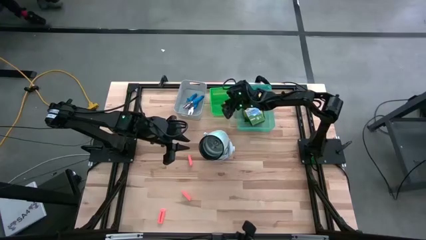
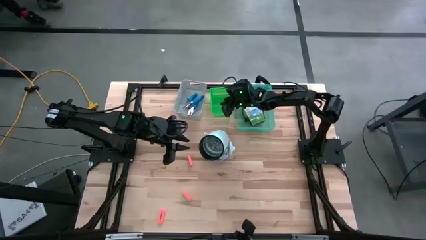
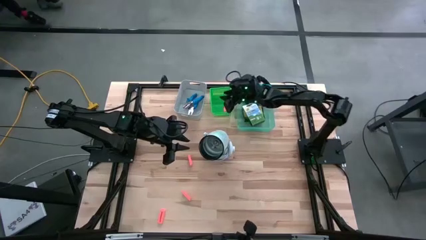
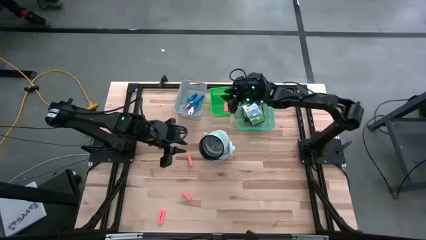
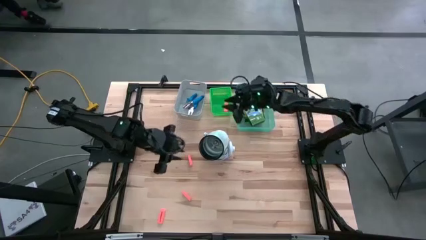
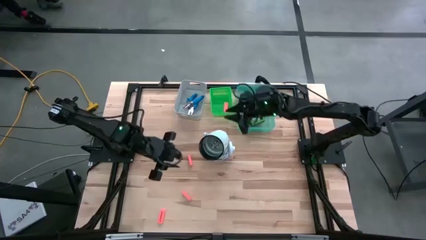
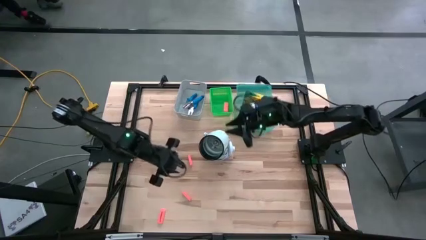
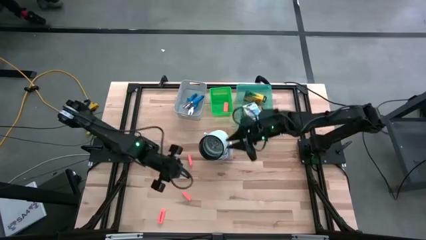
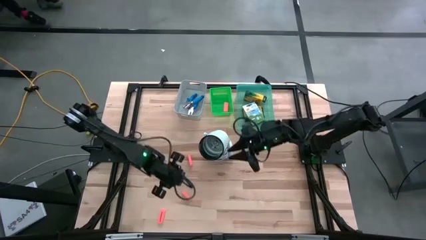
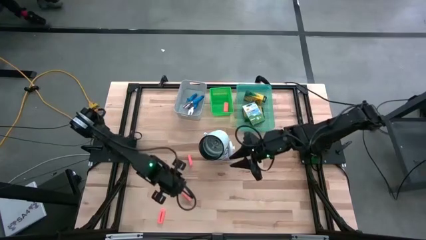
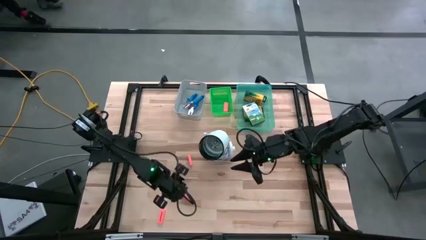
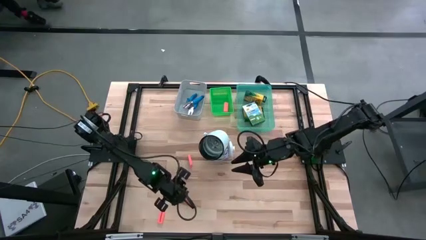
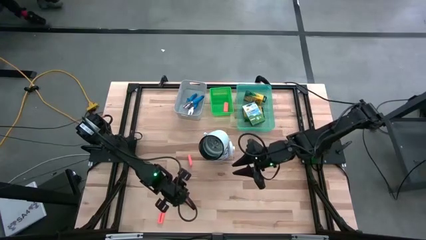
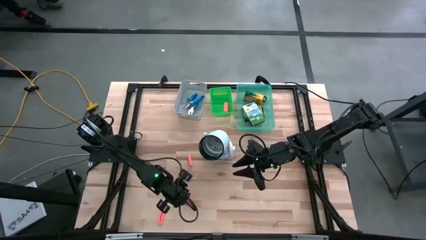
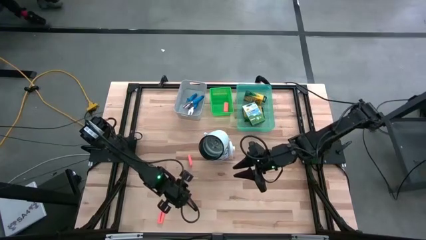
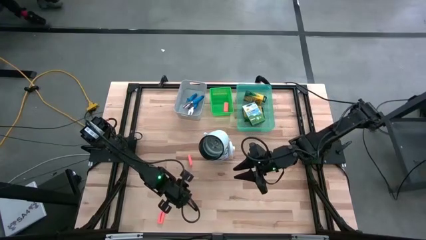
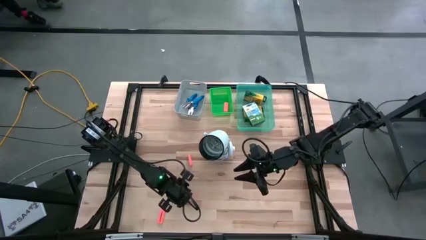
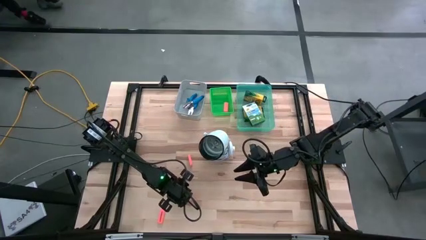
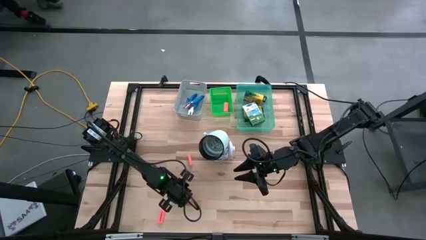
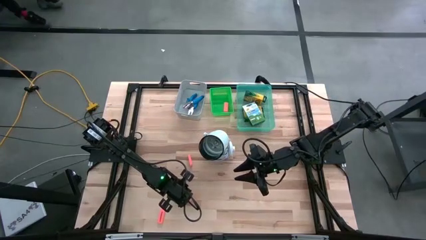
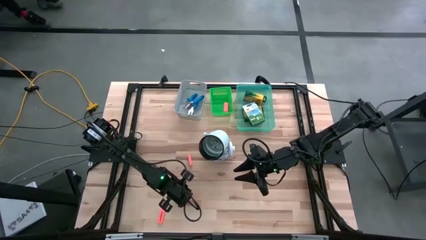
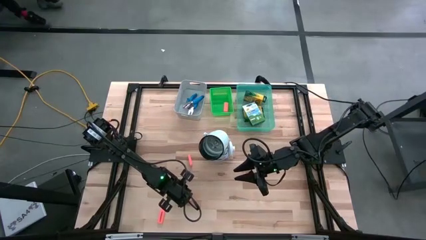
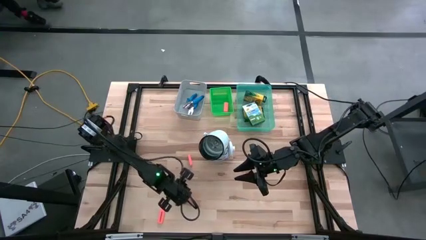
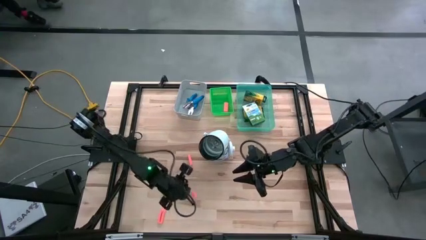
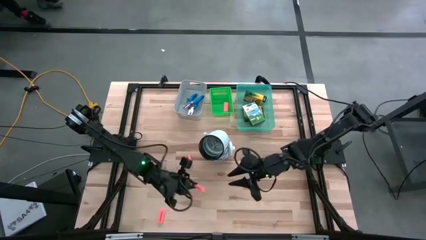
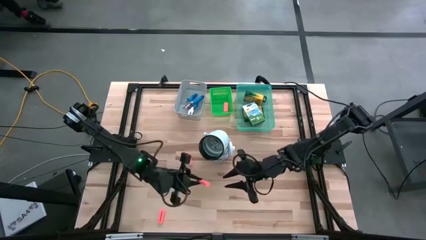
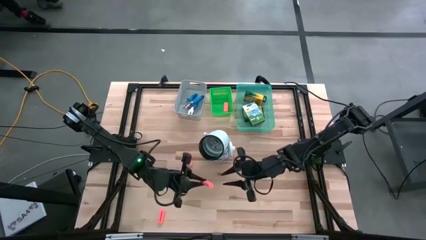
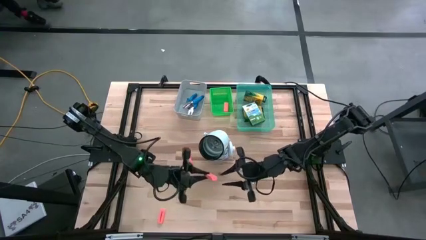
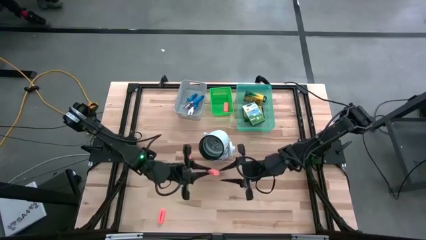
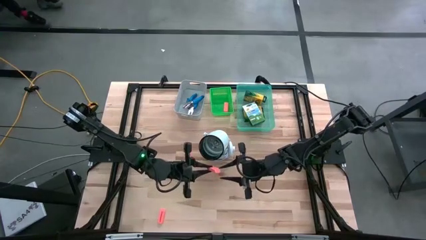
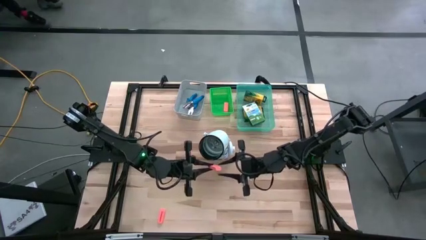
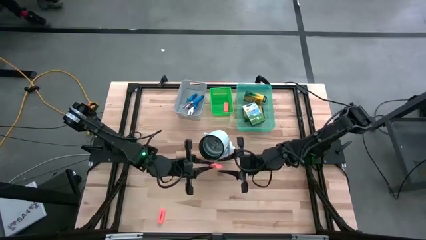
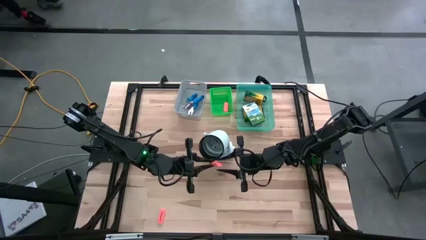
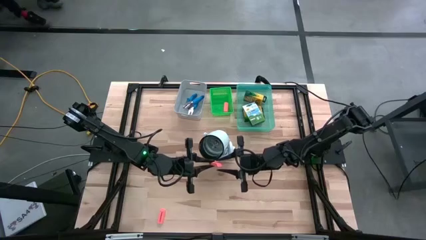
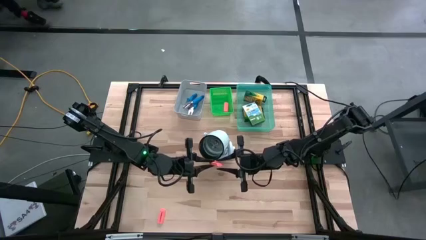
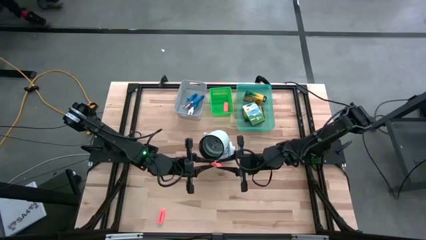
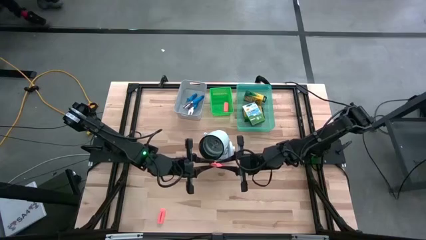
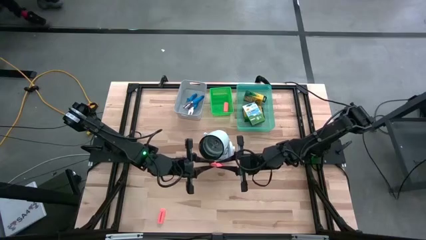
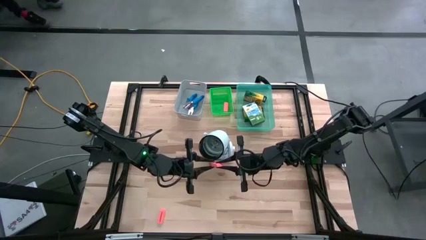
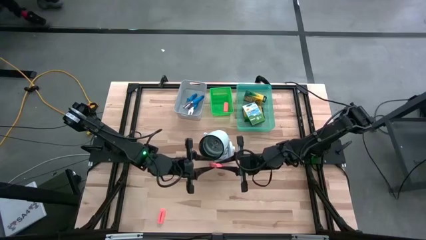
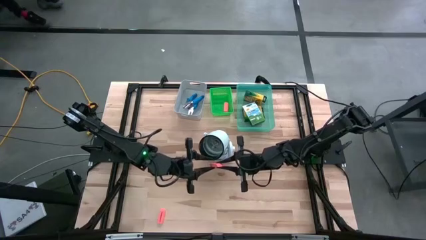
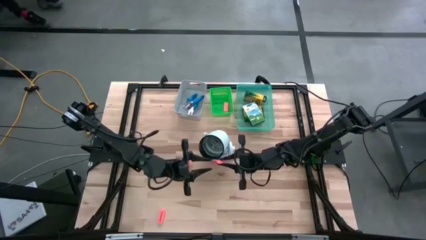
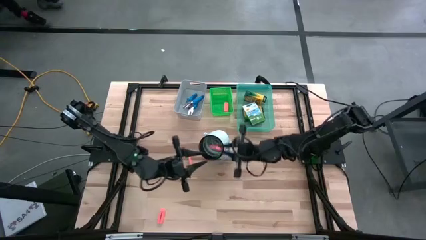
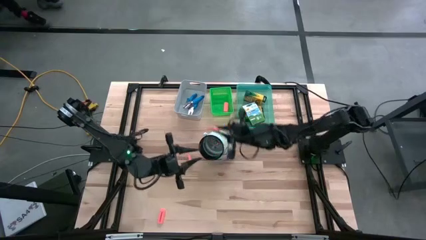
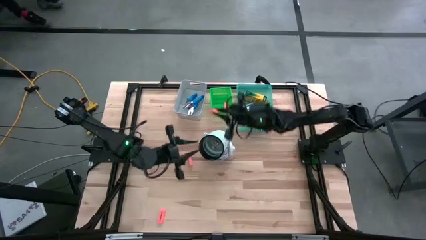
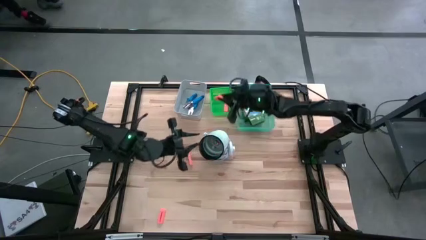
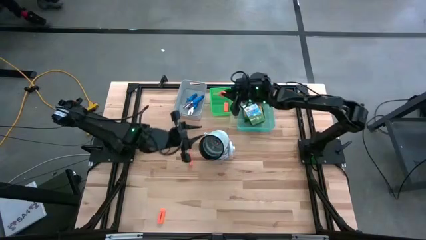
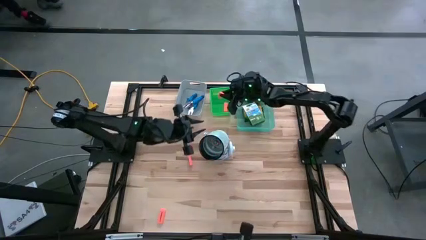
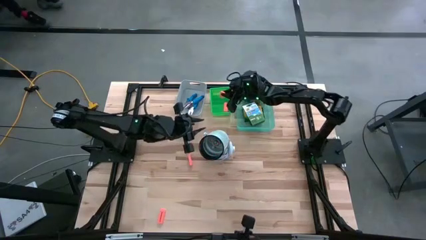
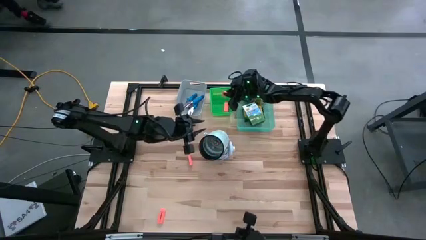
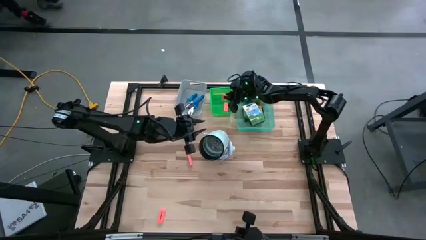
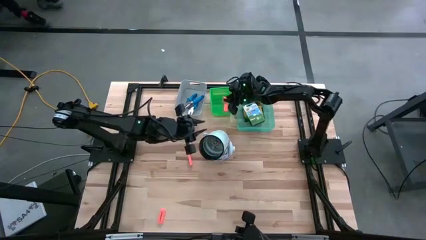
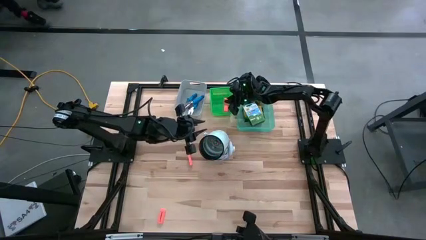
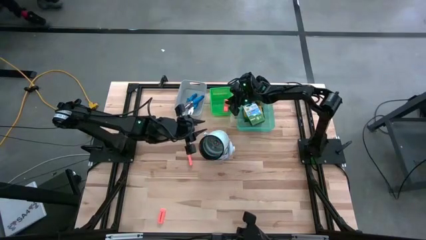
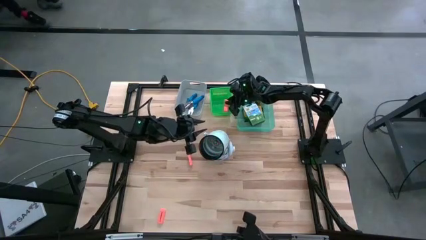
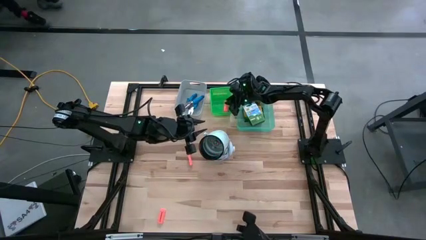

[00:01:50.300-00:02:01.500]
Task: Pick & Place School Supplies
Put the orange eraser into the green bin

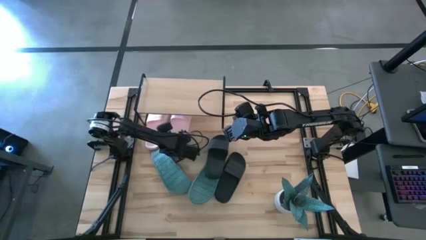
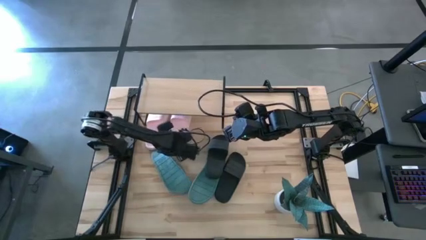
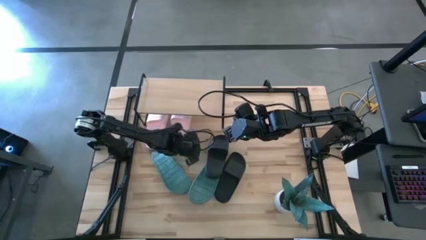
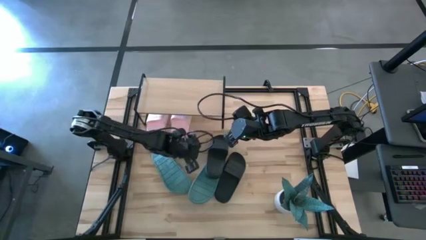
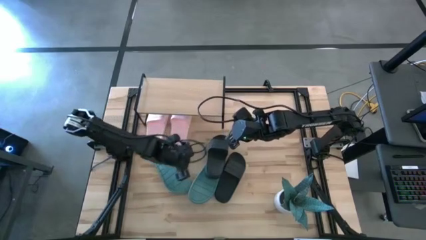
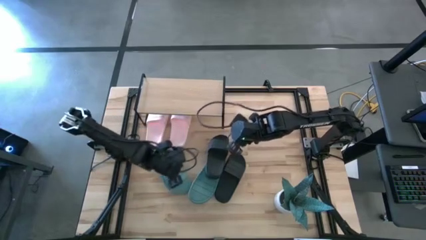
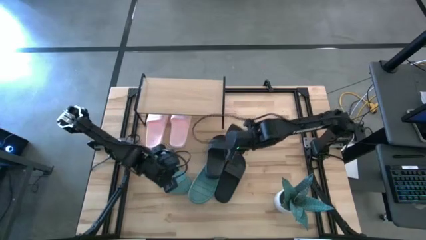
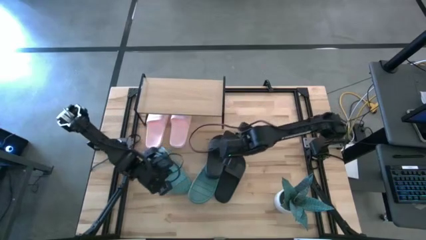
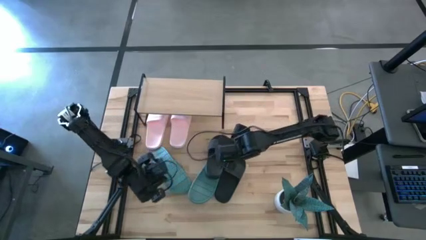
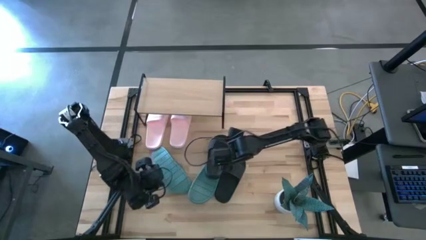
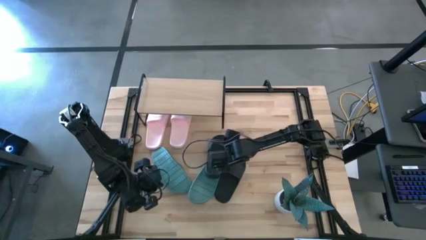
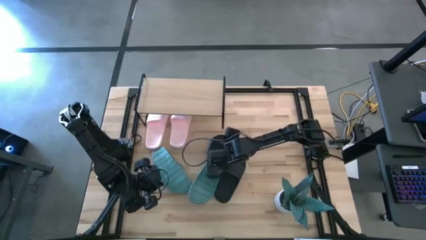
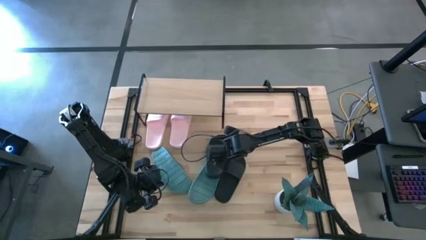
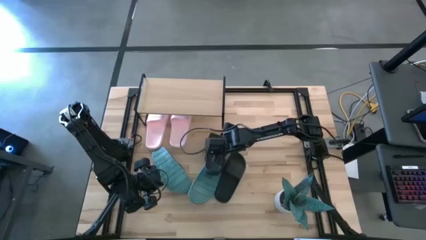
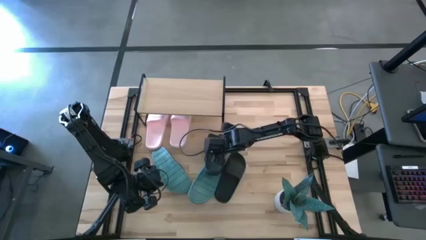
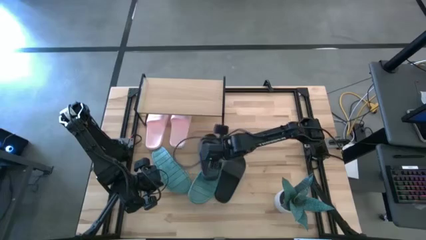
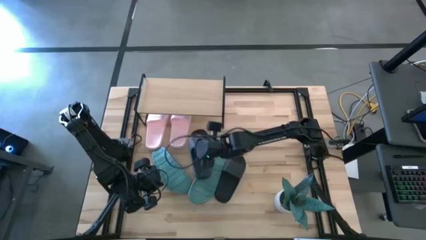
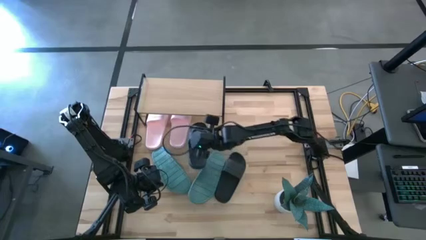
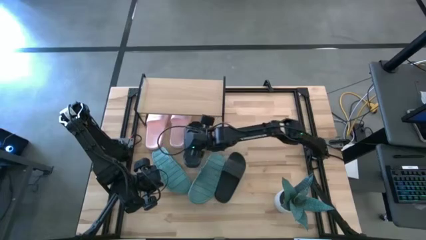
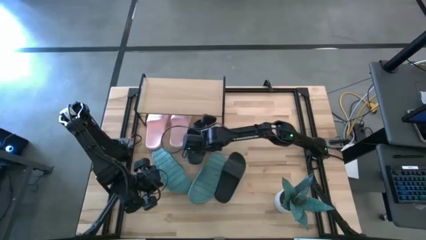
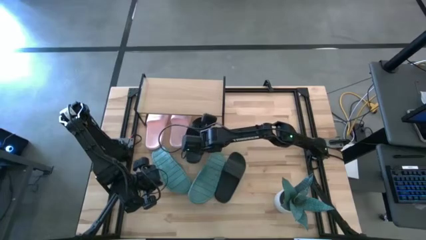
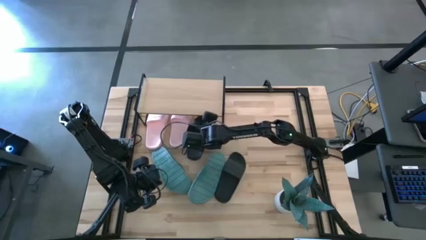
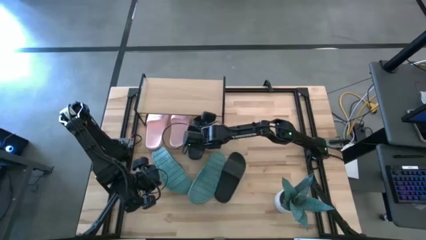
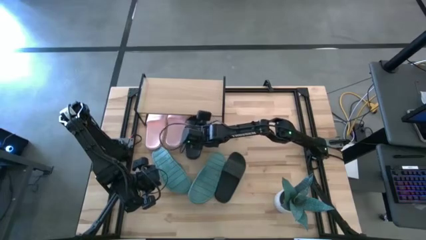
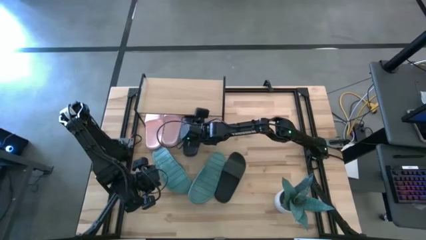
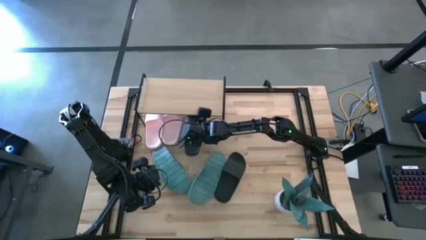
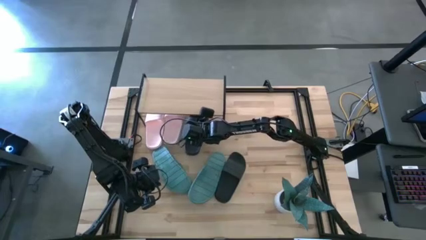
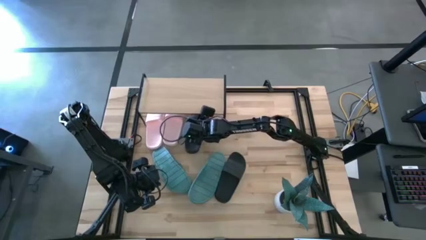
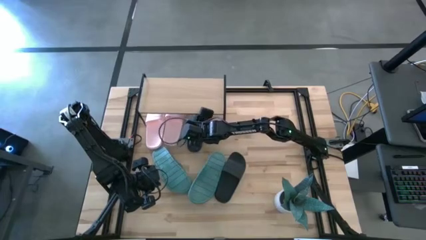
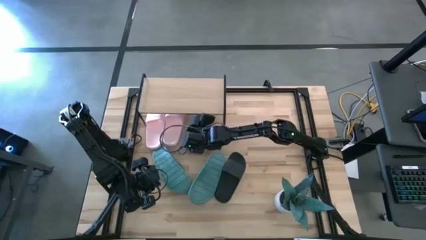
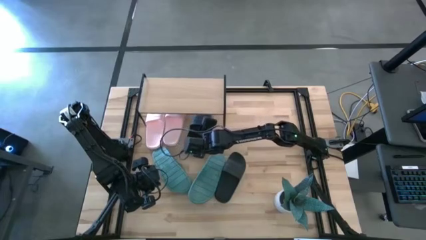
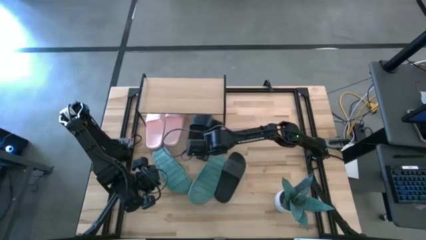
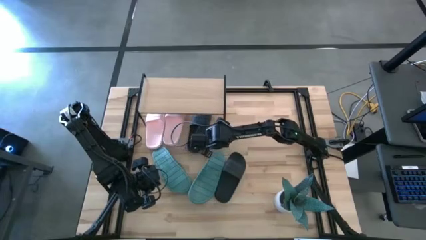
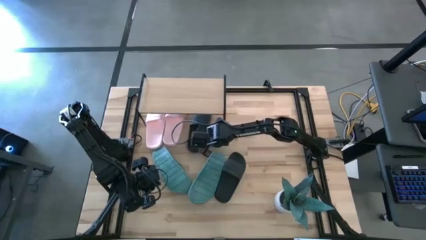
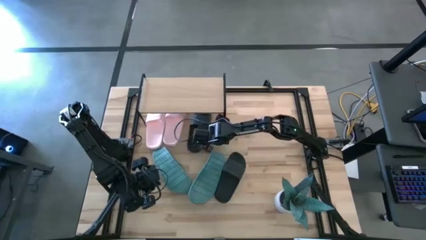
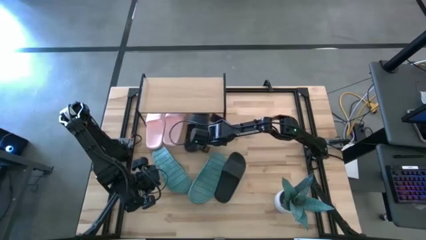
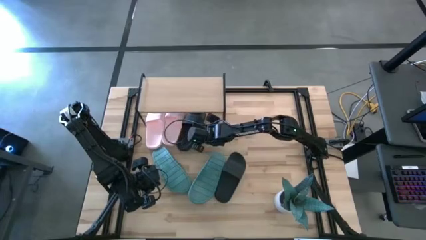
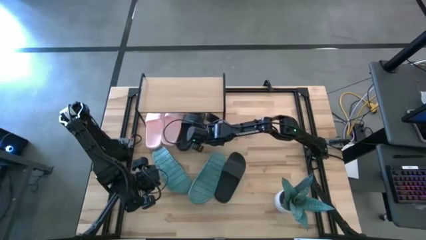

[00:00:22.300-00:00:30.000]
Task: Pick and place slides into the shelf
Put the left black slide under the shelf
